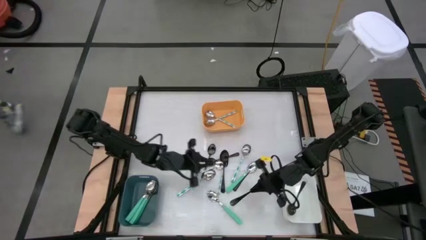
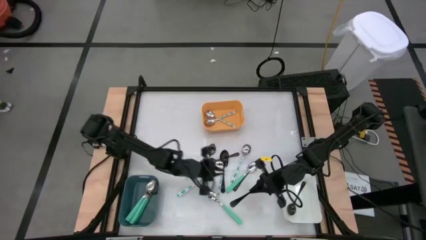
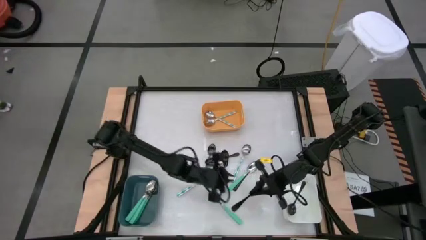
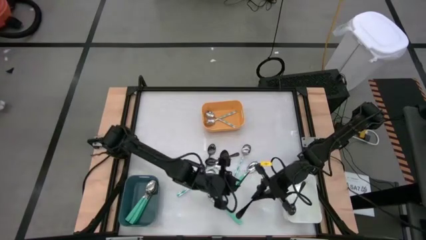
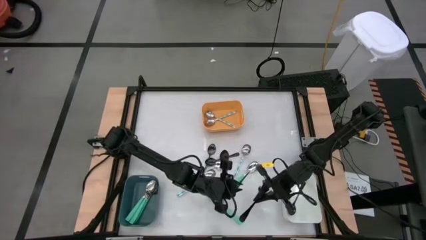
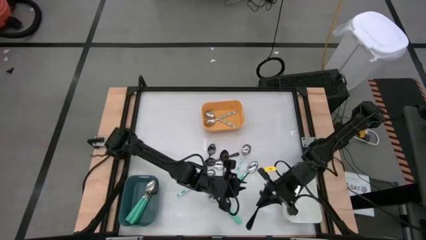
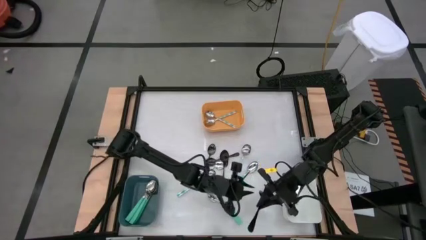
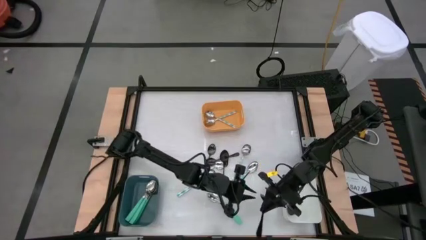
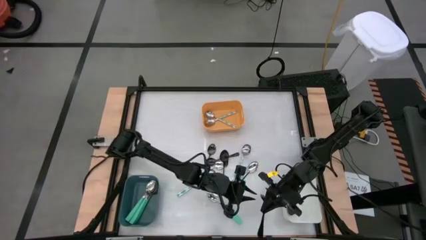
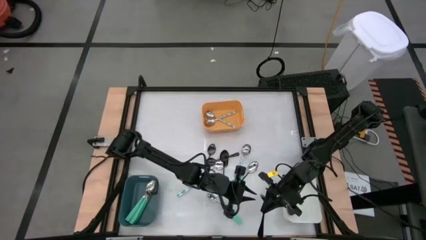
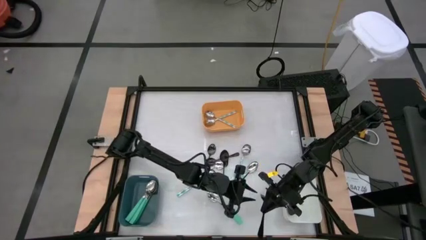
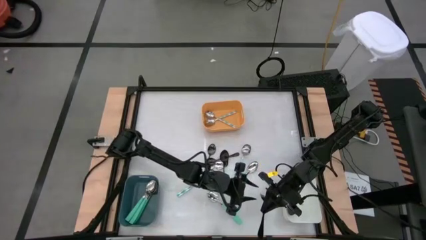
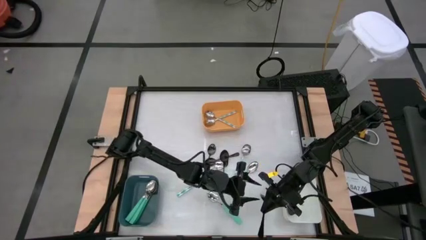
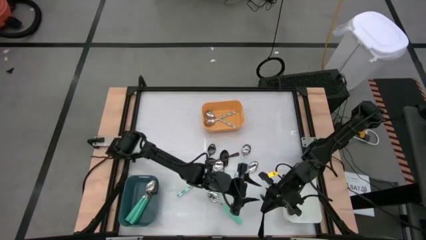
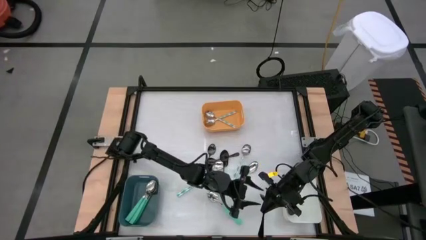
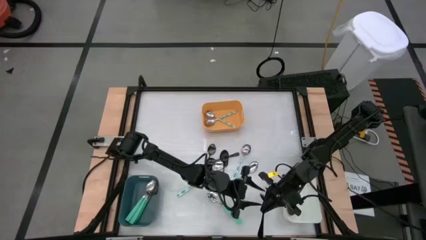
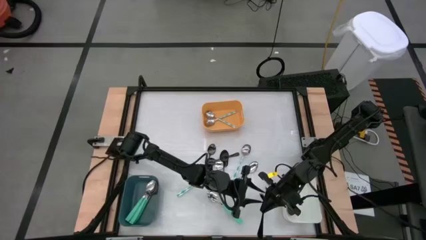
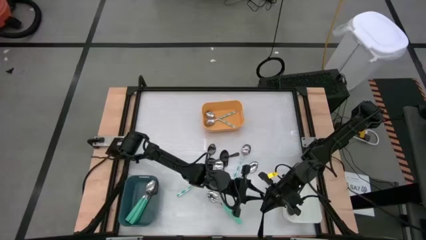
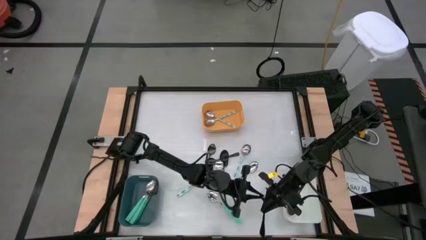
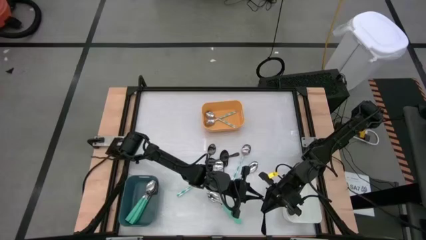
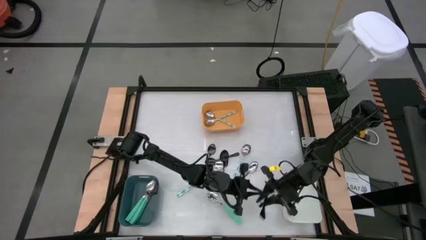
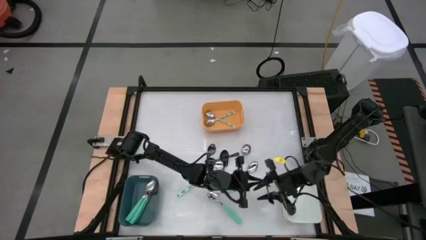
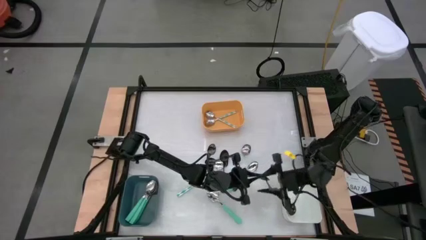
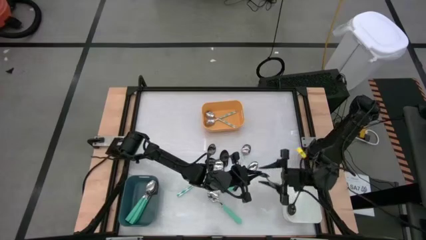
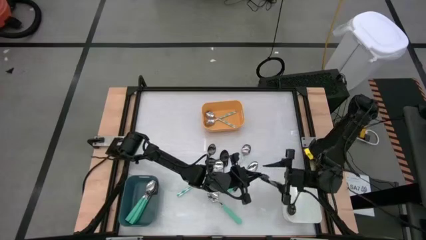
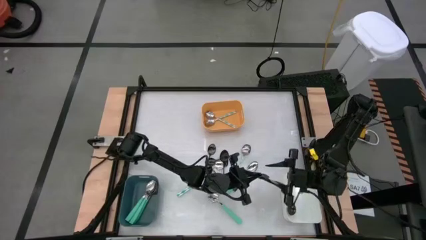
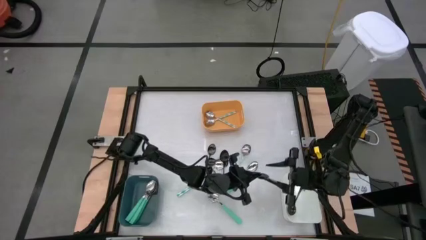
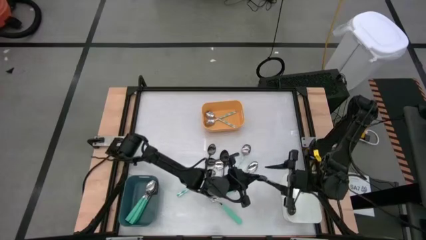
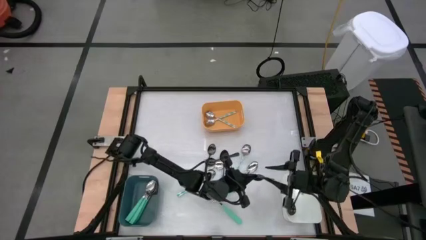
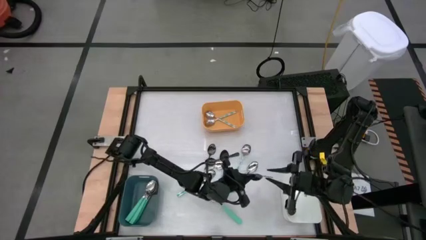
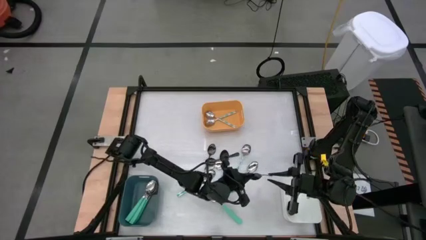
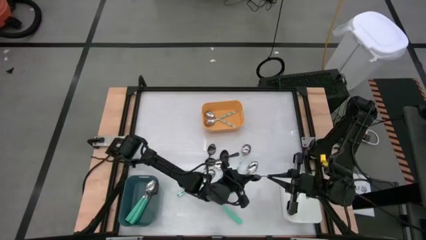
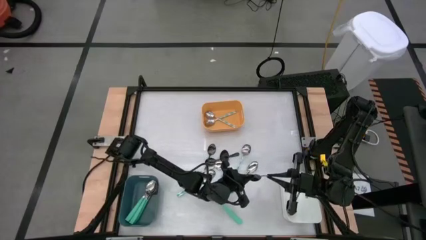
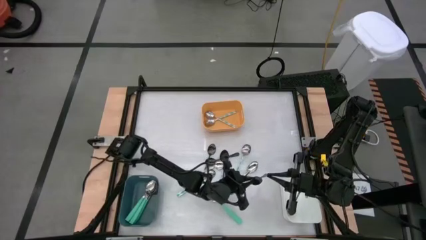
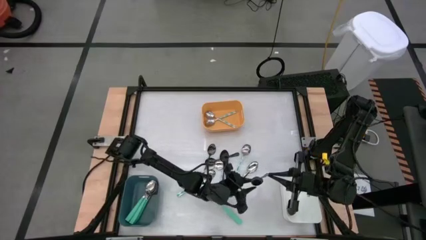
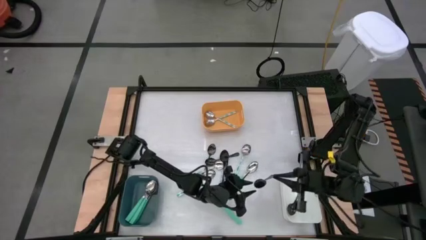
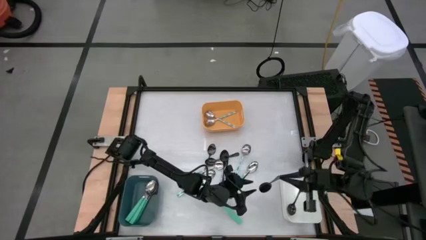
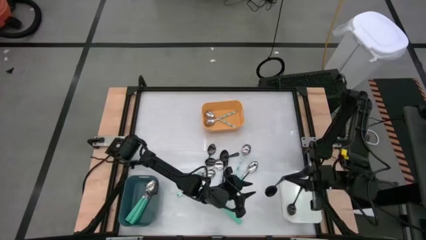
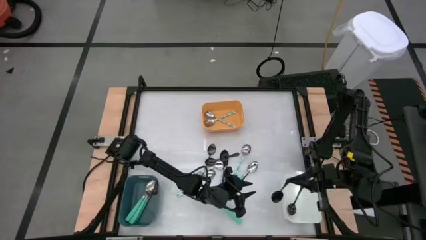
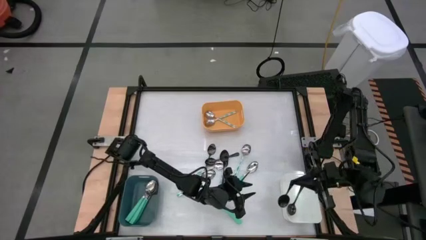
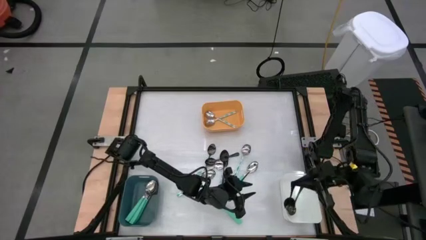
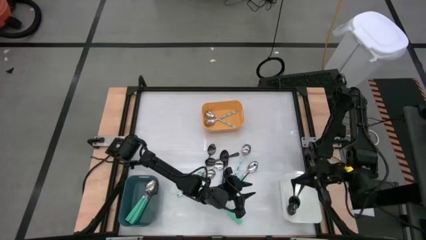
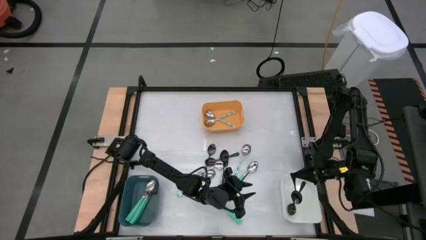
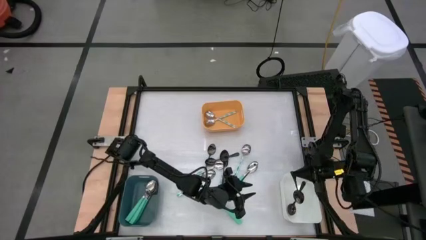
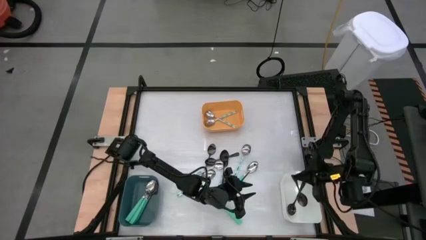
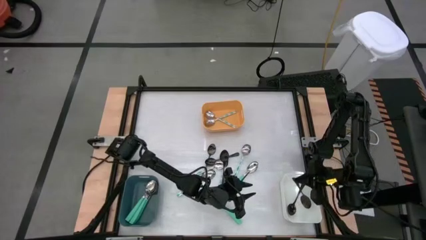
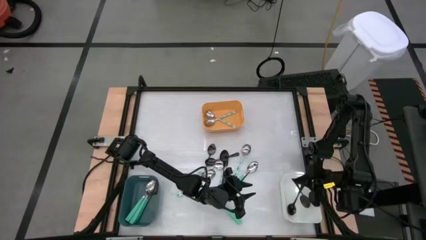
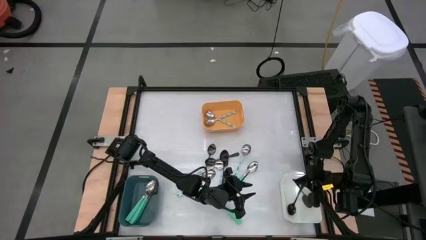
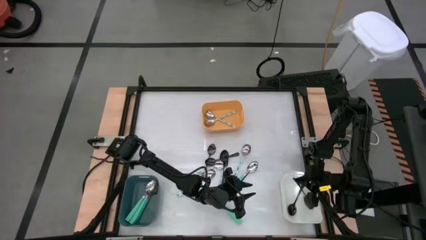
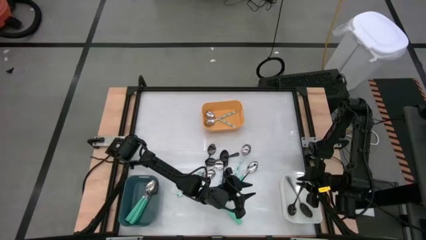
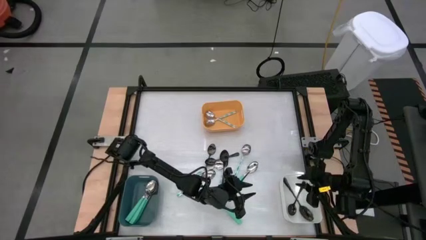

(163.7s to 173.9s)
Task: Sort silverware by color (type)
Put the black spoon into the white bin

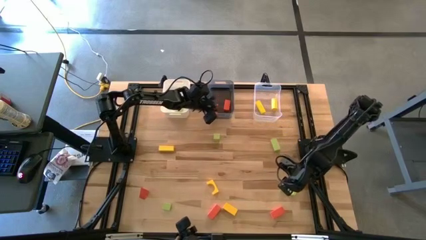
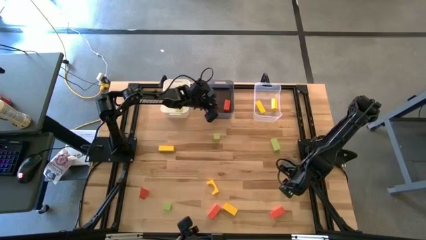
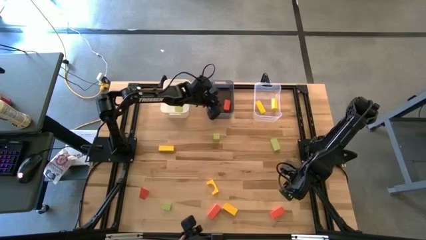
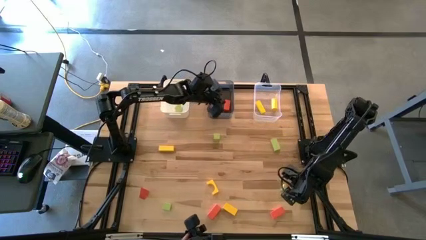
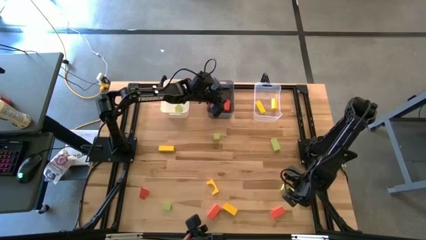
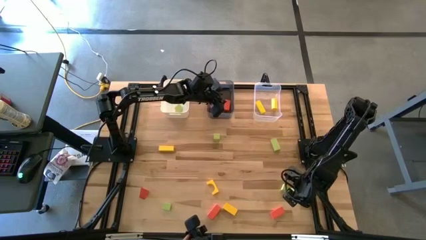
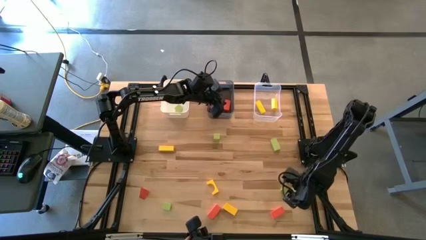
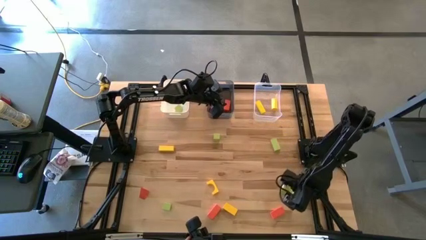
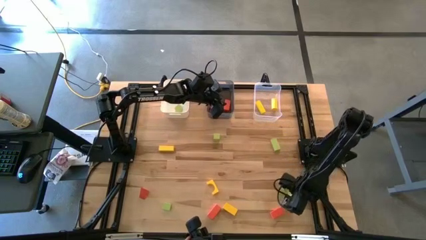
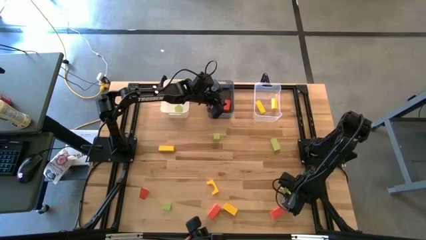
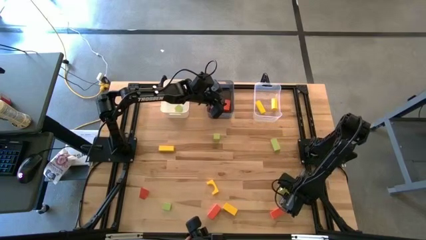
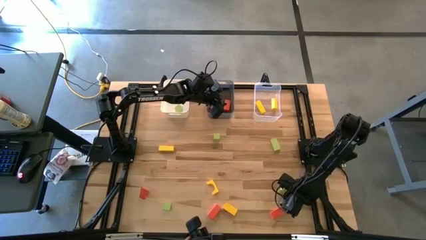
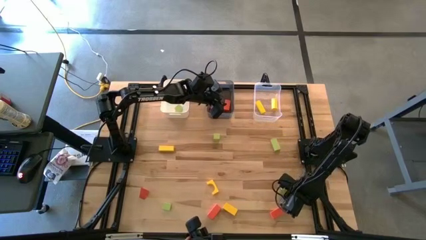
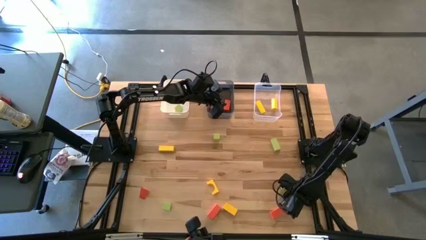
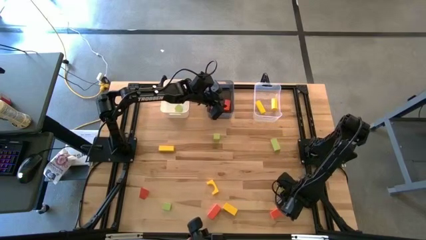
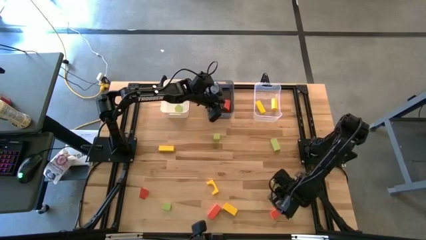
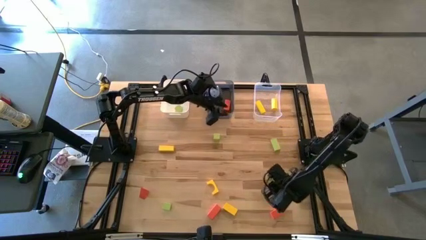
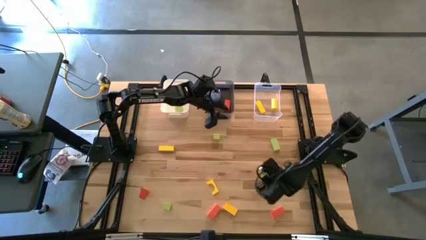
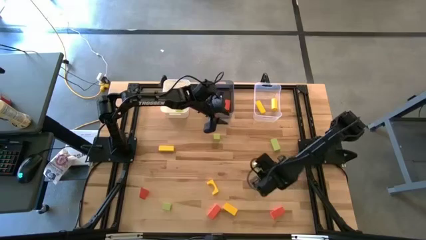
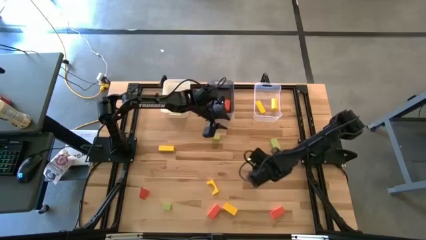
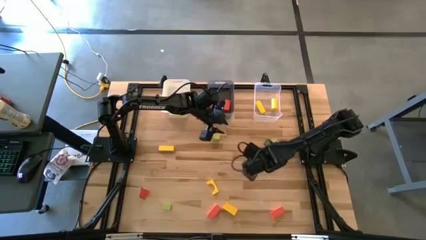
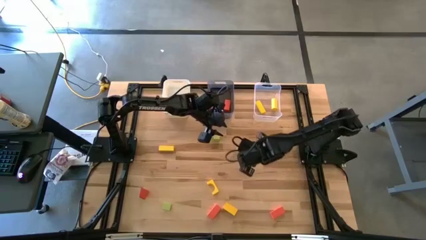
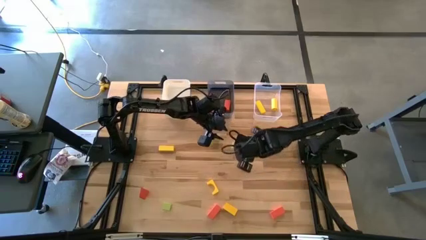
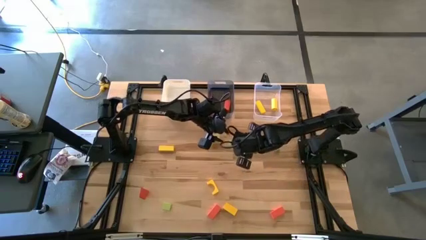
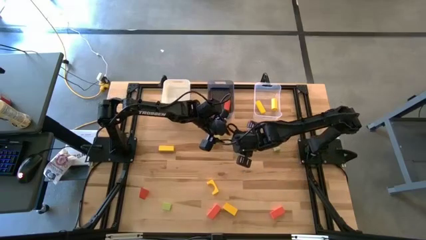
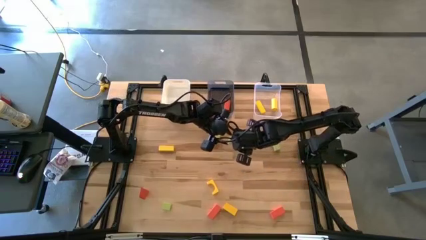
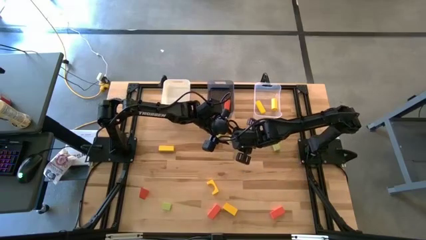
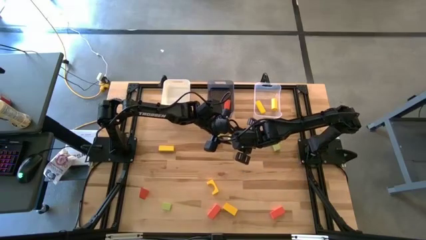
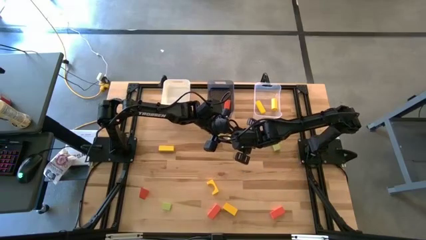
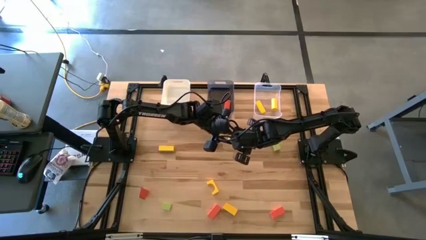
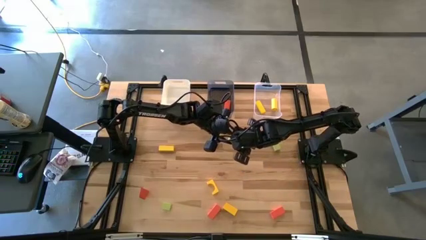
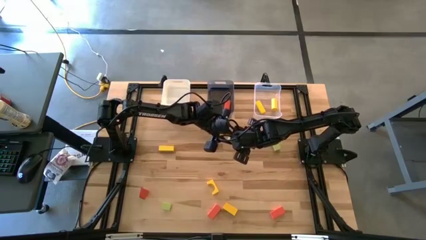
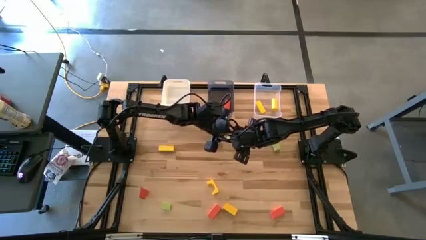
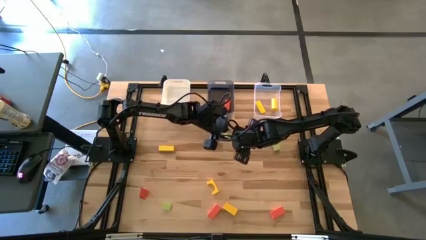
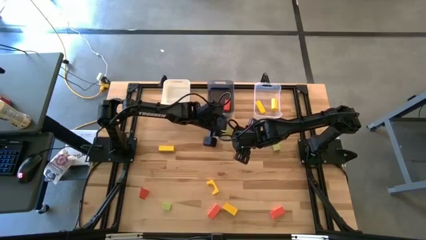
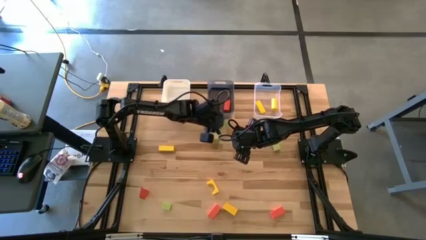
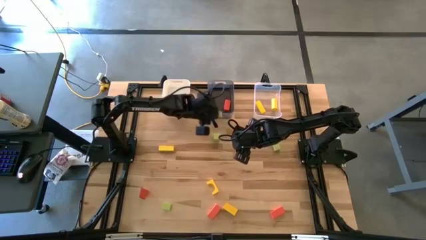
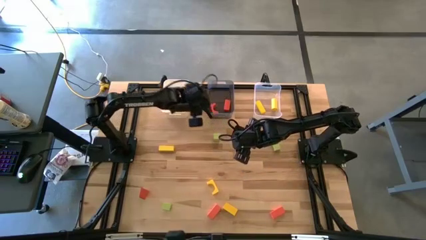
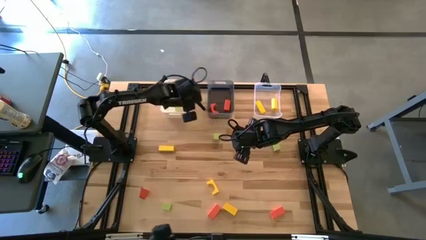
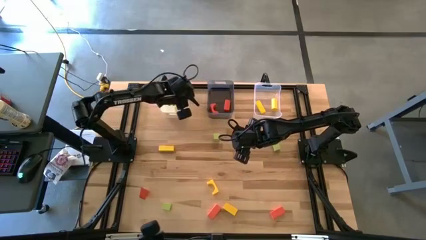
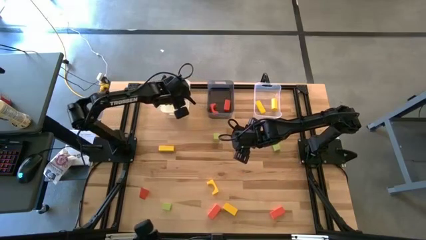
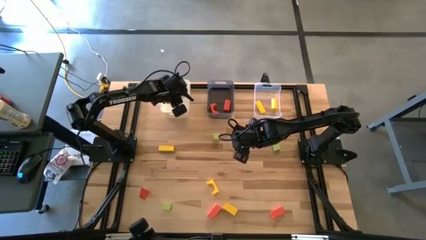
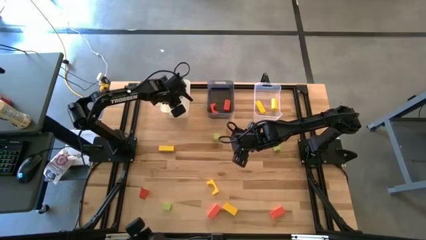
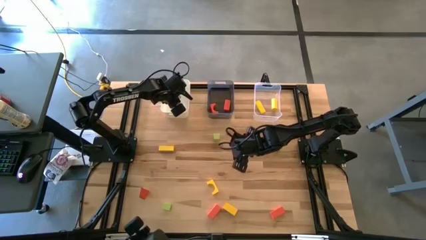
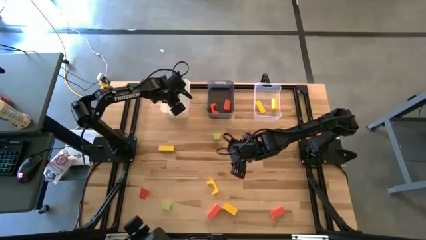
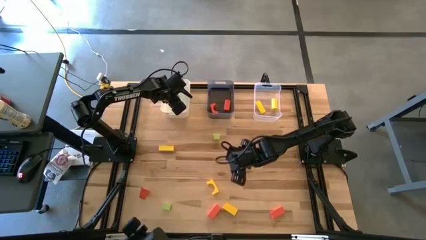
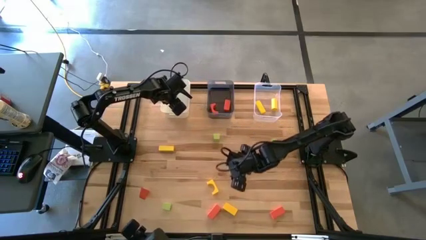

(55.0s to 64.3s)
Task: Sort & place blocks by color
Put the green block into the white bin
